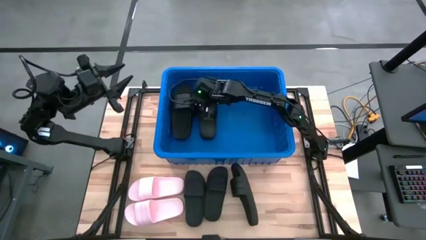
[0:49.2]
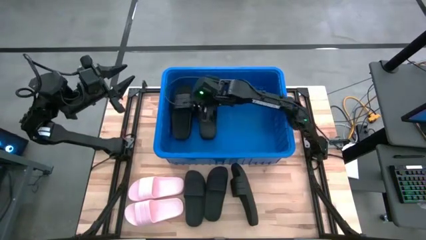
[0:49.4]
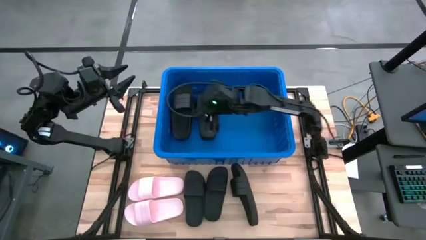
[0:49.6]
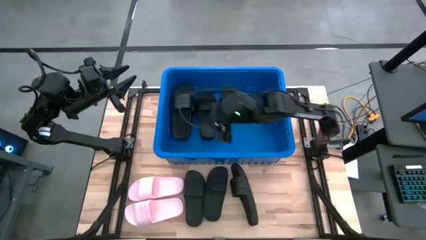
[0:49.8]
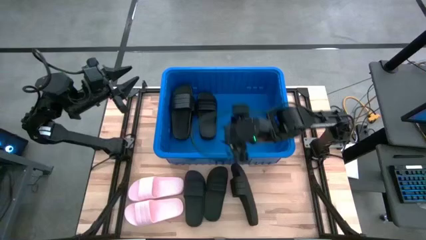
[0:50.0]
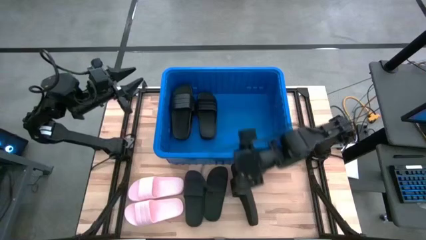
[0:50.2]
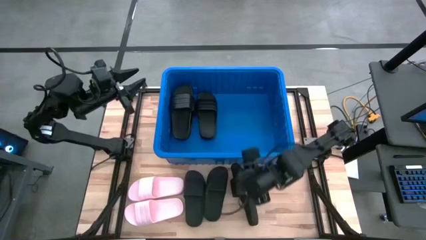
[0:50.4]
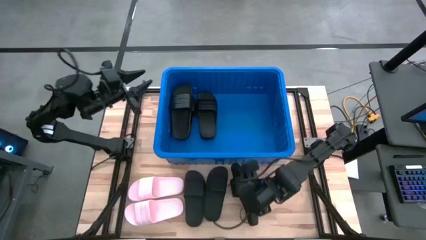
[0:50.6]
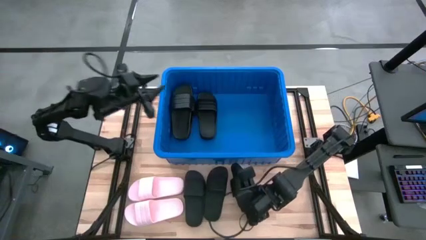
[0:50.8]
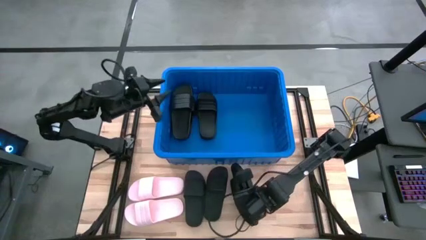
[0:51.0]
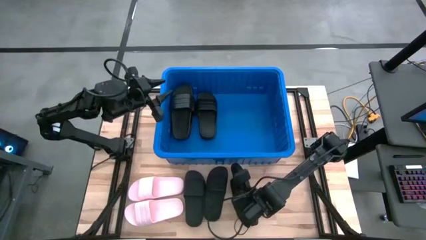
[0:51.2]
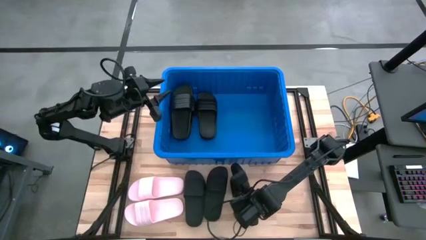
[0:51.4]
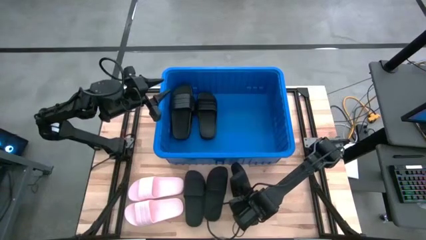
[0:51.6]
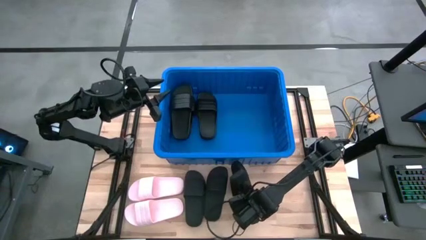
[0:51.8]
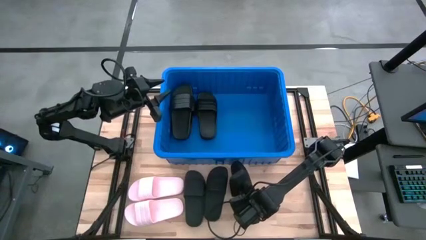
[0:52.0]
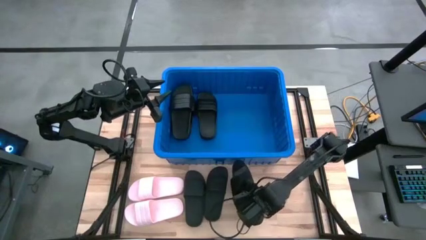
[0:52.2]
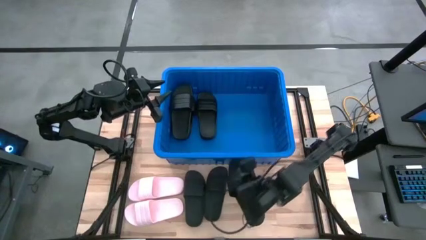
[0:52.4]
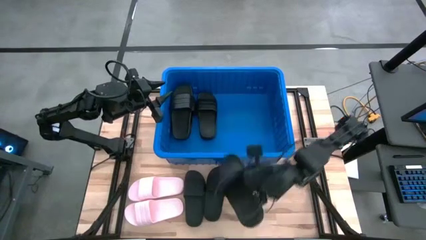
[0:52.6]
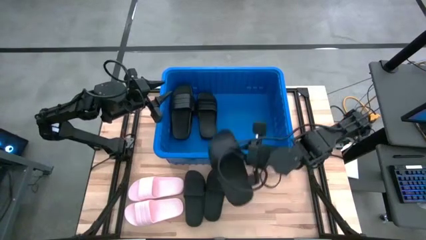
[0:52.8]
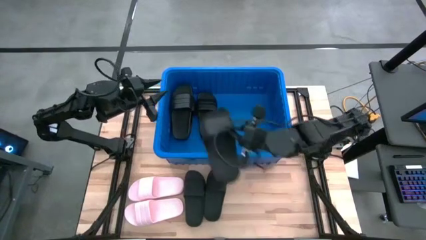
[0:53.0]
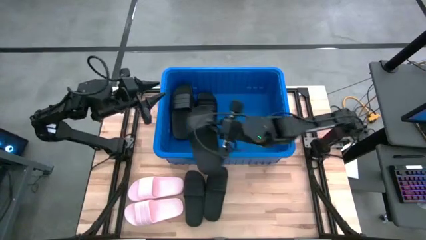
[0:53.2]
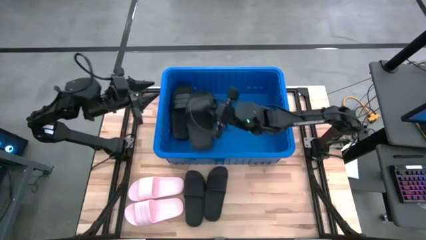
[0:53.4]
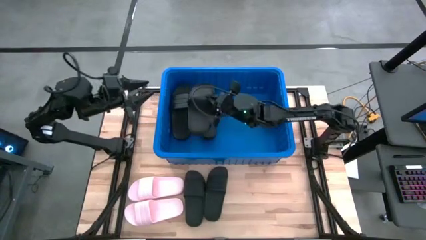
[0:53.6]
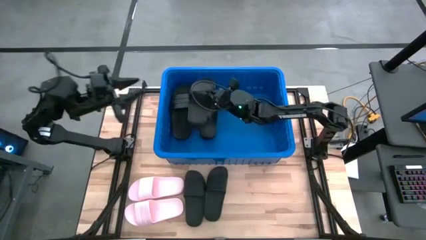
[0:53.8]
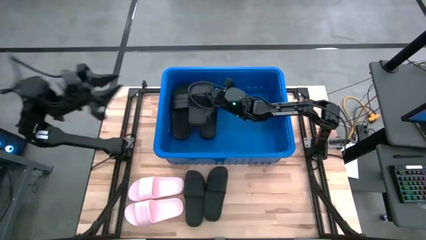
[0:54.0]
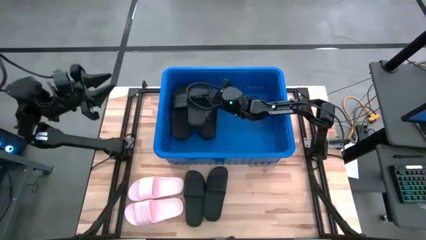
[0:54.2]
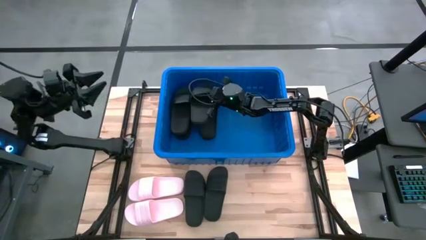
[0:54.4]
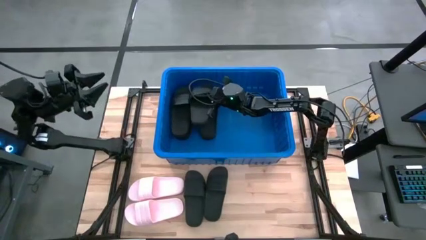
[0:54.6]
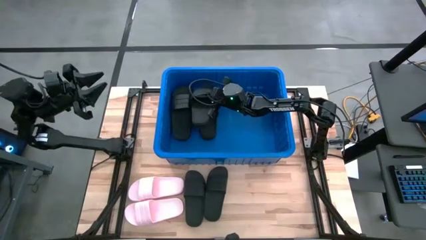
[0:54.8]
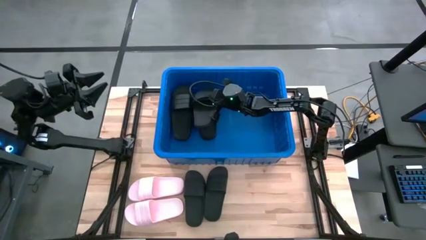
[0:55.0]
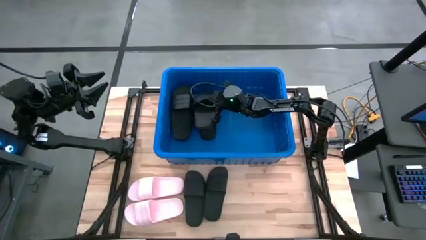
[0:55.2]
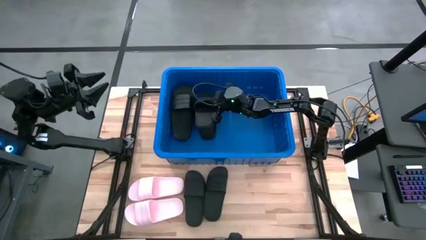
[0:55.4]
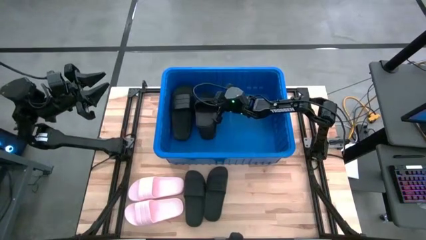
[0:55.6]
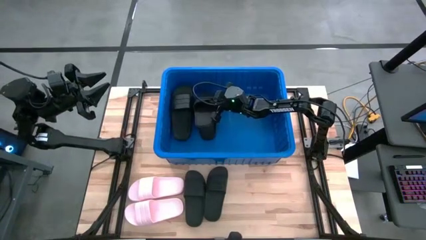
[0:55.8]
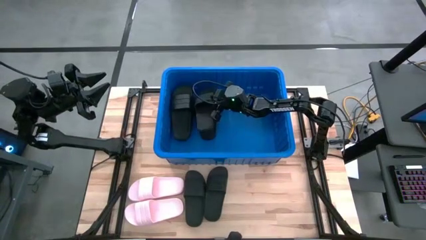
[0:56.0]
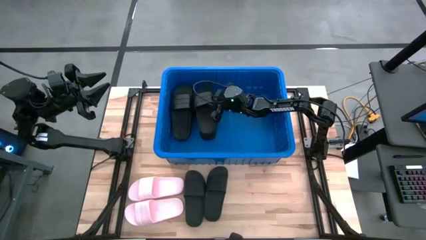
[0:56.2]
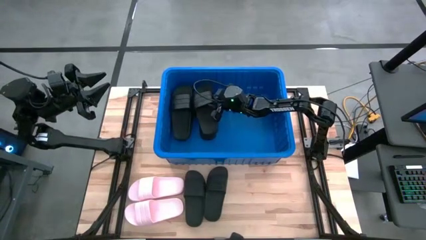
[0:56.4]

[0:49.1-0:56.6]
Task: Pick and place slides into bin
Put the black slide into the blue organizer bin

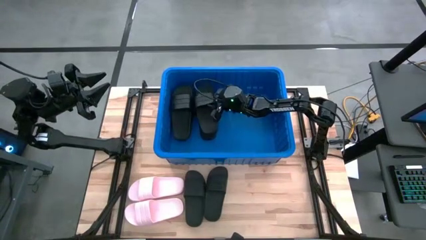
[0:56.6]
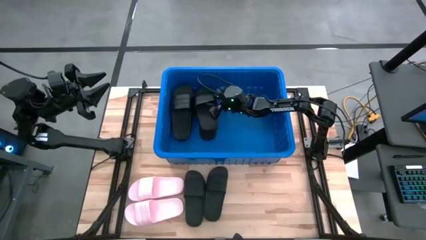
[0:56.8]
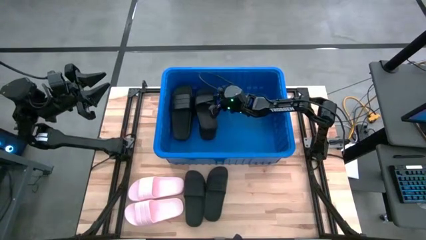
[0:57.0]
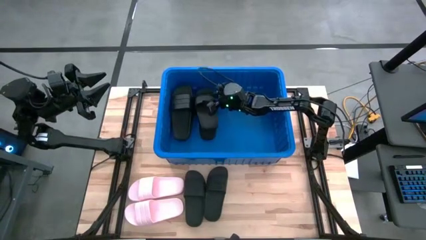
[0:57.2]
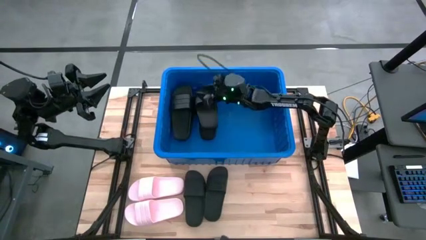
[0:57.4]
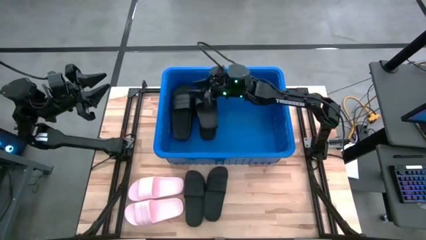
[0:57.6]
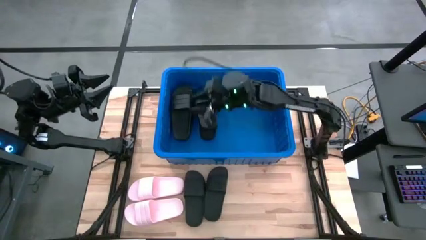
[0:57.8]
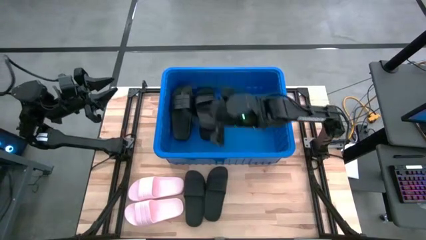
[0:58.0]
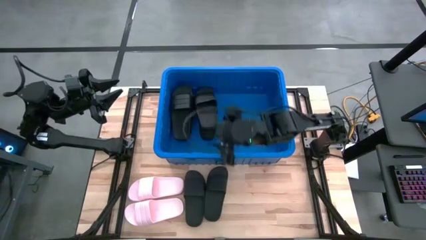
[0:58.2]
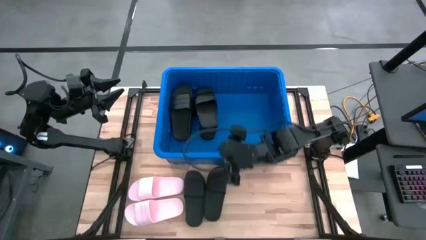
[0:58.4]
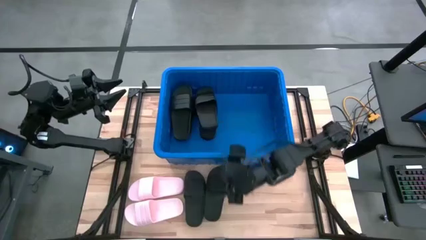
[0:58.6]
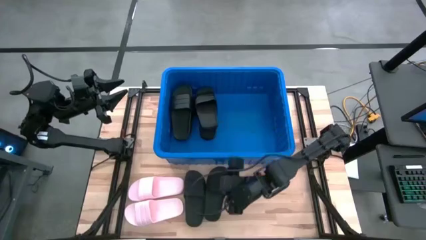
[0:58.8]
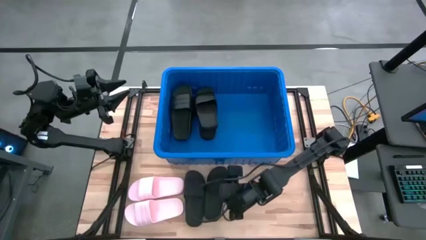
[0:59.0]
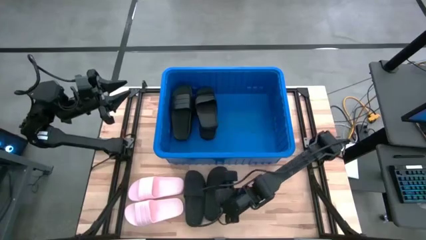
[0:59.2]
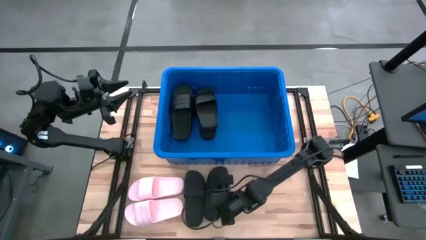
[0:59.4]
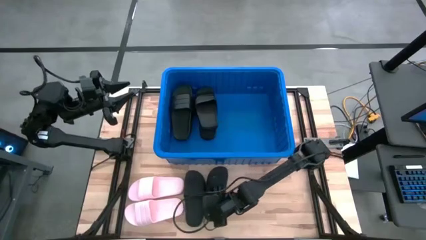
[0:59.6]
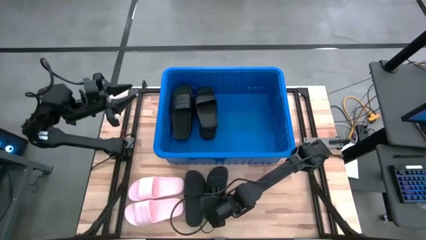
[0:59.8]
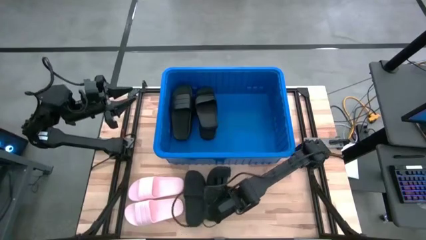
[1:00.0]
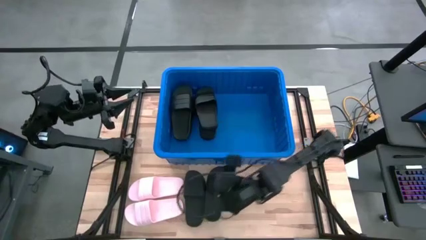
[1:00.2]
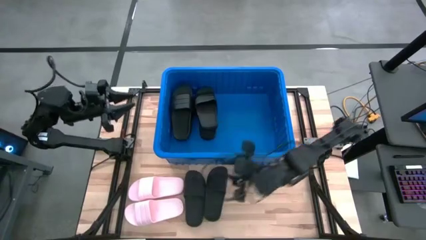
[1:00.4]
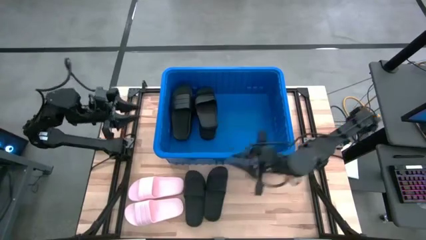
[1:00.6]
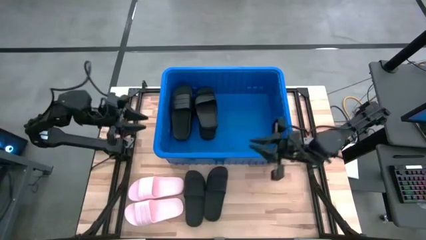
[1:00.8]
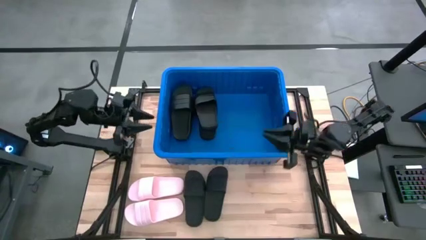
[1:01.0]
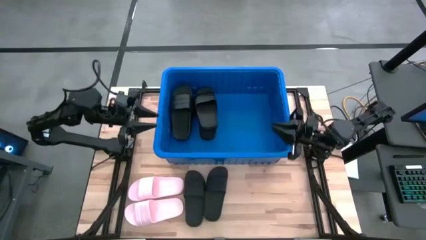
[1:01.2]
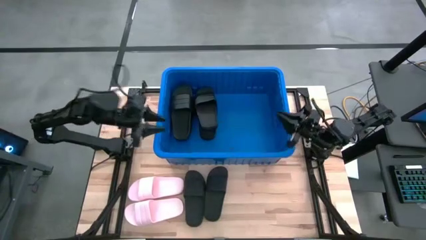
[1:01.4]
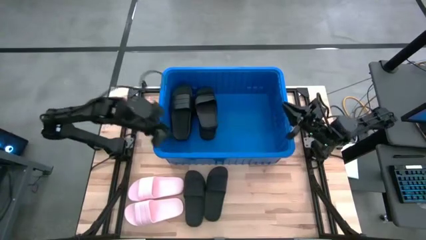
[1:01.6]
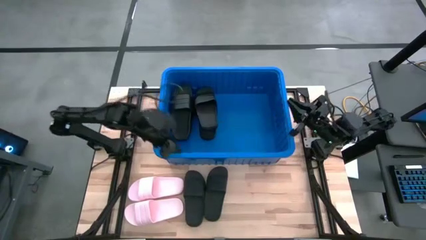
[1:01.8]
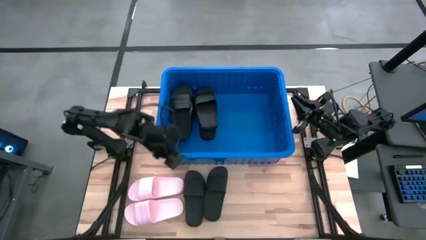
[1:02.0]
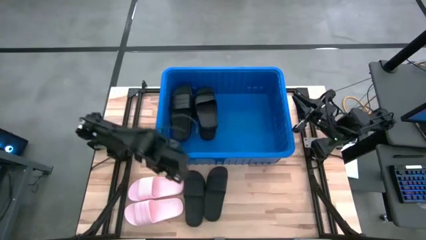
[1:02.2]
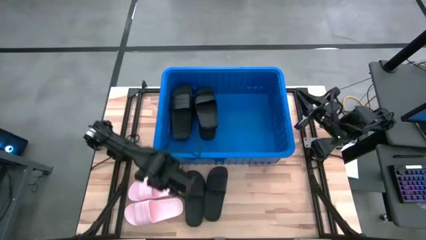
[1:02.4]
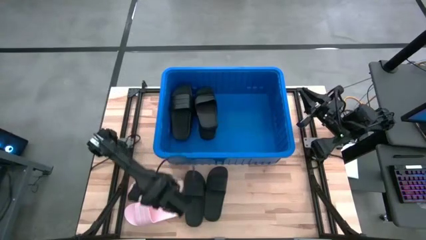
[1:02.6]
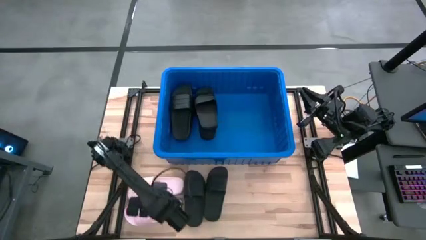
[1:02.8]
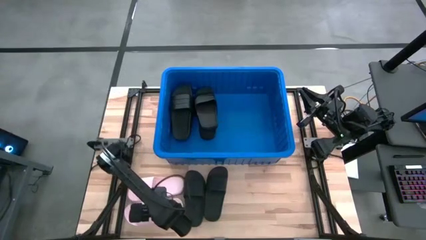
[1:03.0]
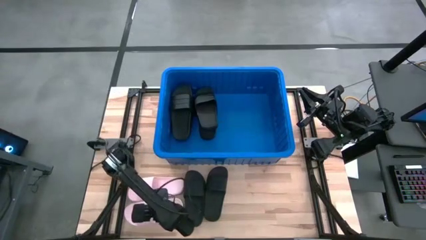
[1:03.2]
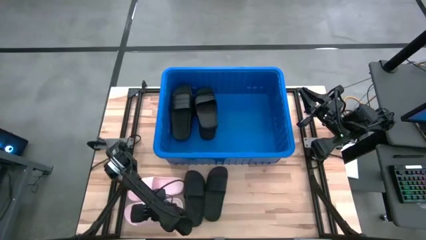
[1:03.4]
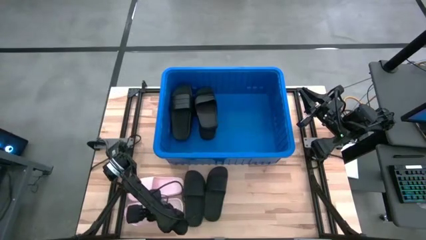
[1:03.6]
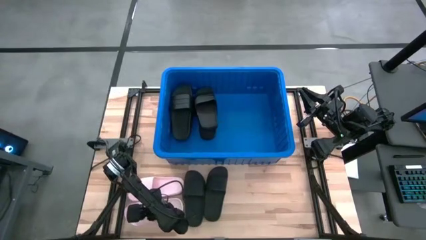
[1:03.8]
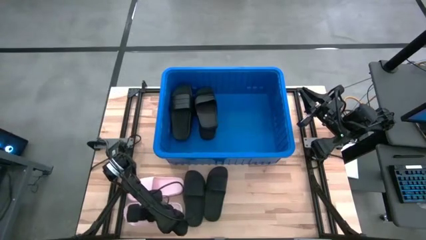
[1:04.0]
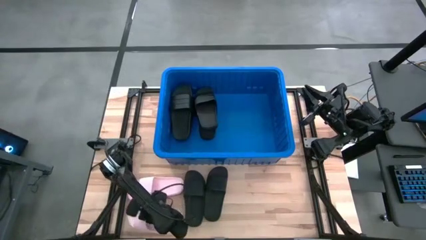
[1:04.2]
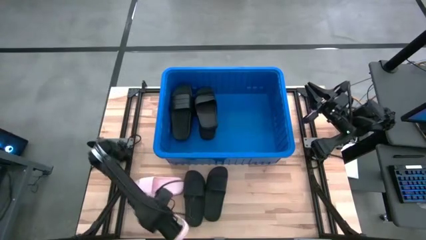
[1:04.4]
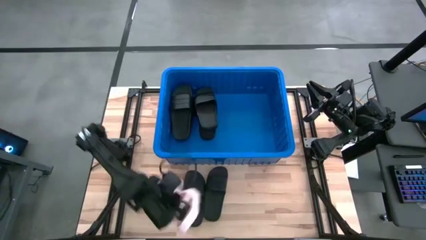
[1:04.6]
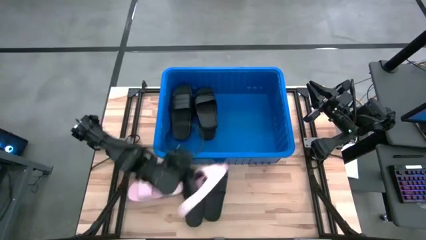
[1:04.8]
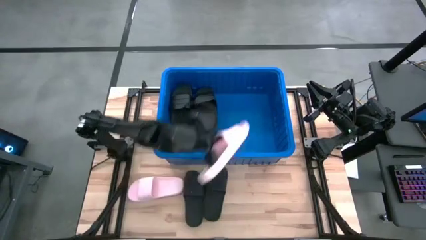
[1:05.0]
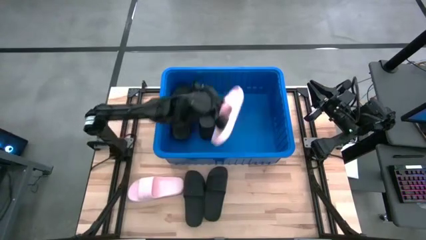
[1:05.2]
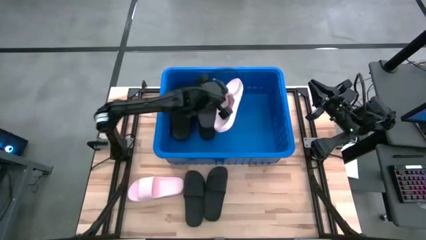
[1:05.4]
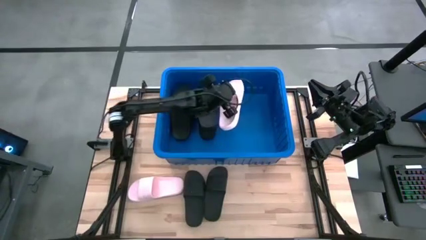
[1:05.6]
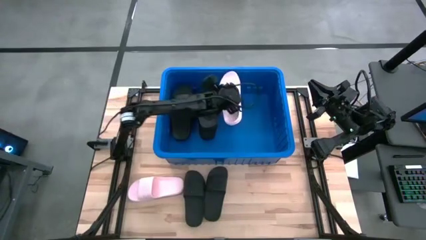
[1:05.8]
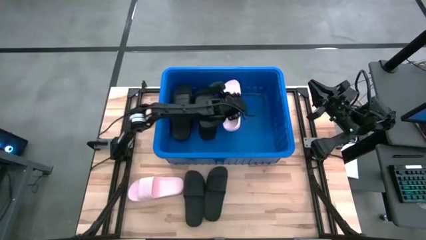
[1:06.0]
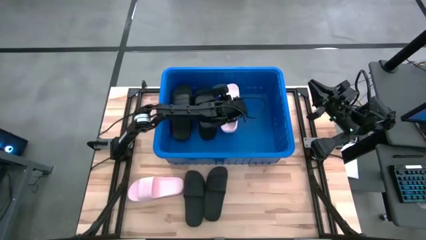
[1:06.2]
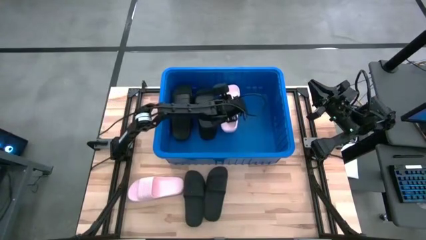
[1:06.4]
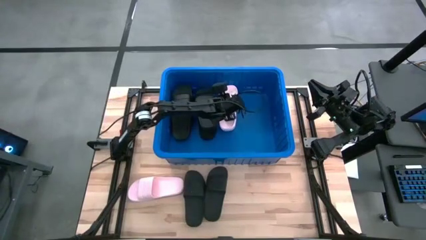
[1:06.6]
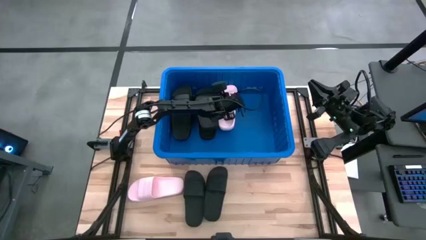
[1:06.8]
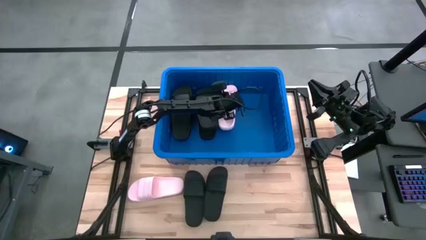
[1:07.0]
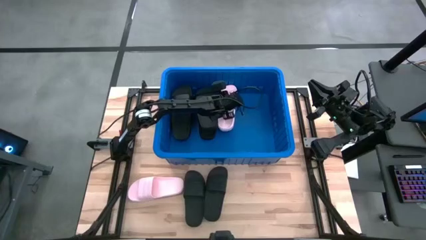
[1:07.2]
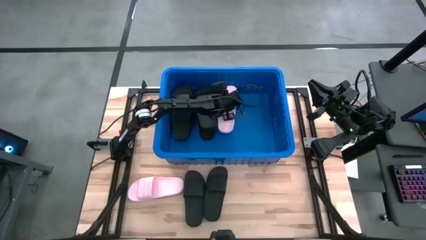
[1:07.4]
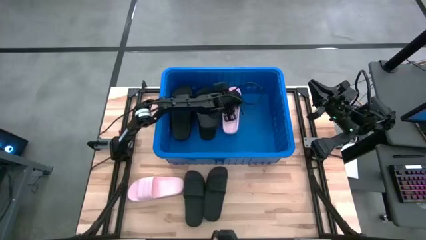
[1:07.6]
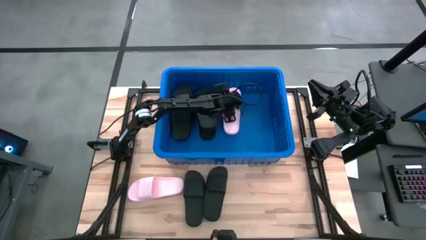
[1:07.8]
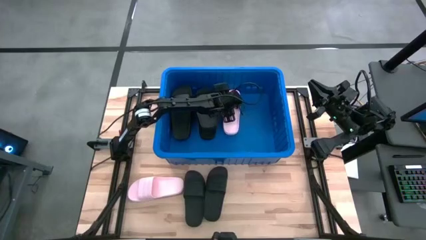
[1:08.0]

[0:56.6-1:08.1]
Put the pink slide into the blue organizer bin
